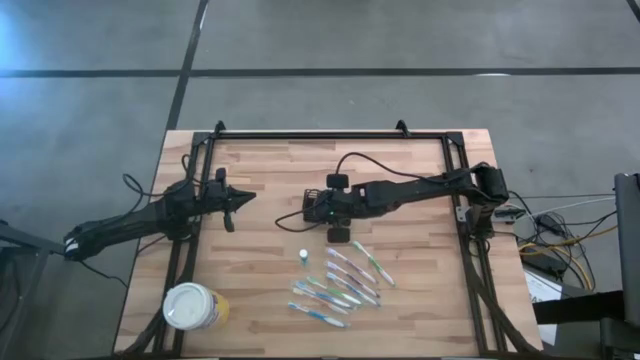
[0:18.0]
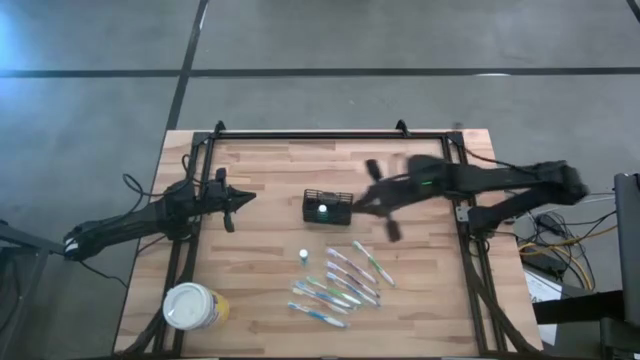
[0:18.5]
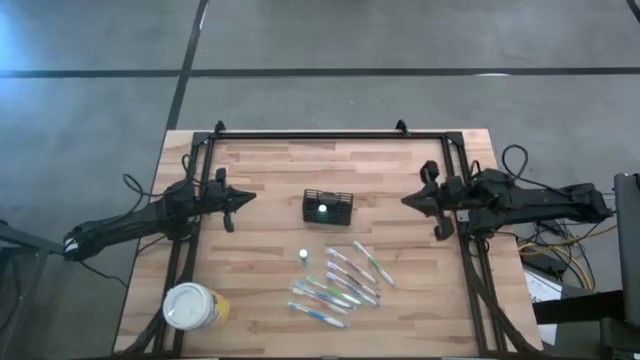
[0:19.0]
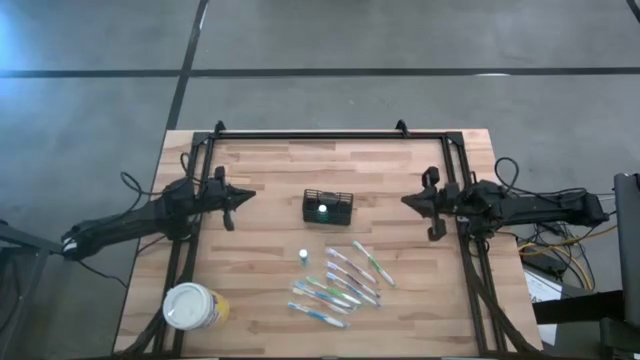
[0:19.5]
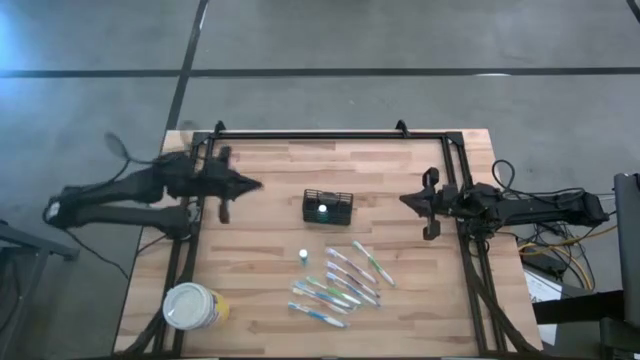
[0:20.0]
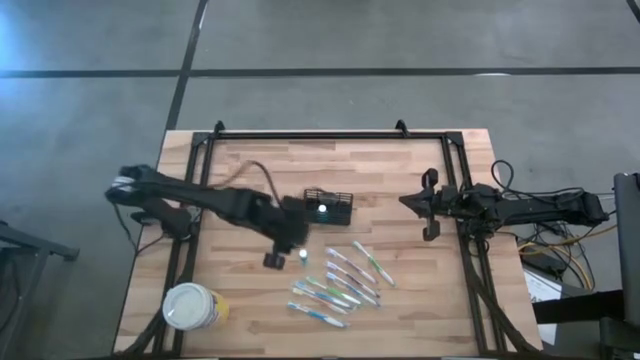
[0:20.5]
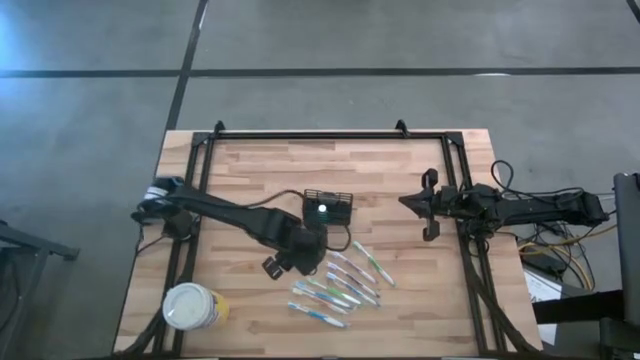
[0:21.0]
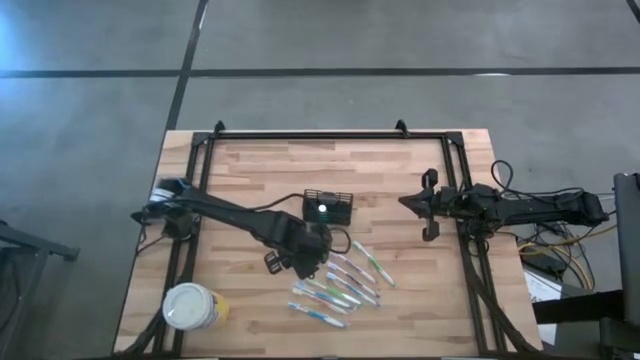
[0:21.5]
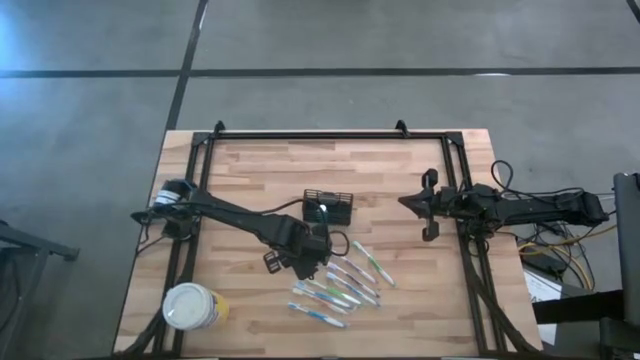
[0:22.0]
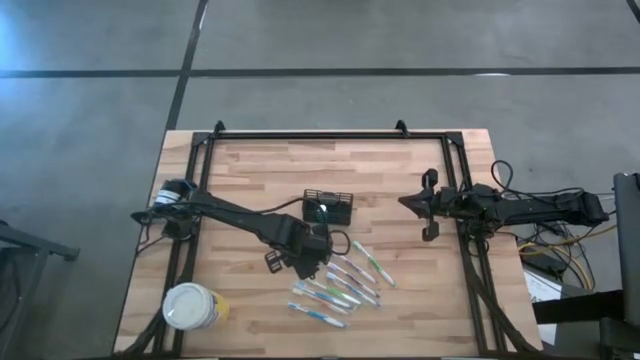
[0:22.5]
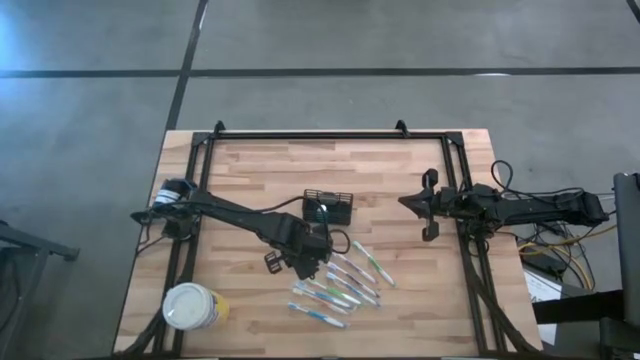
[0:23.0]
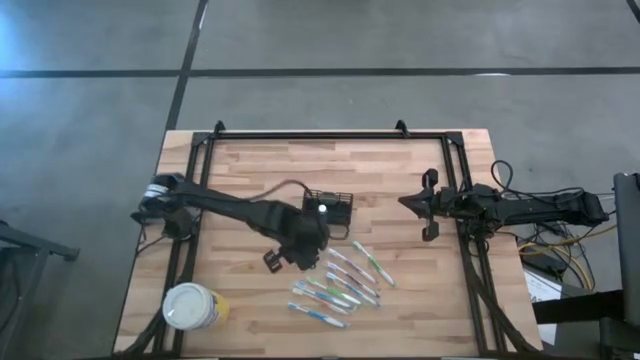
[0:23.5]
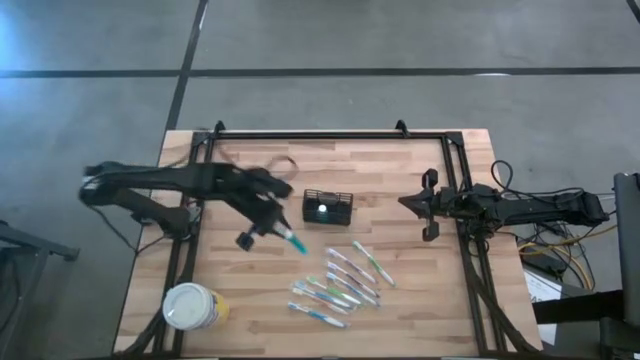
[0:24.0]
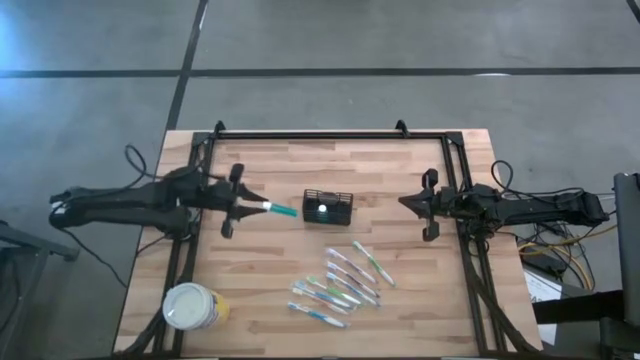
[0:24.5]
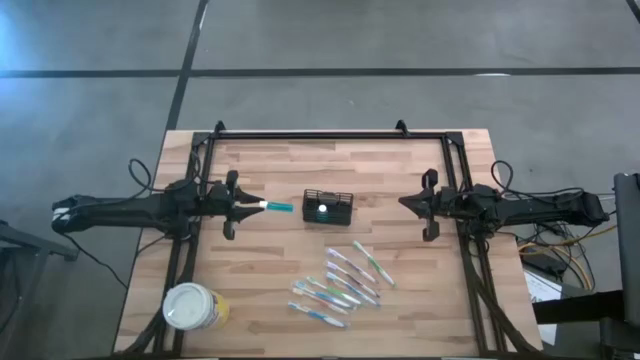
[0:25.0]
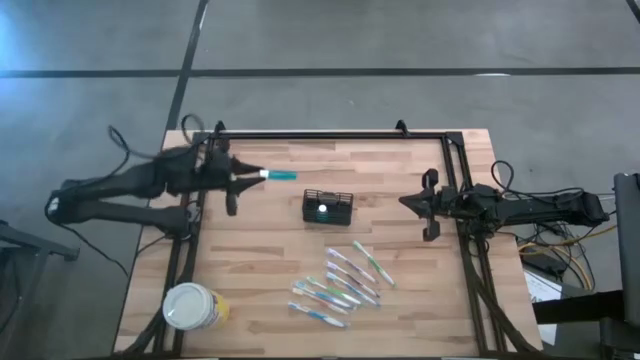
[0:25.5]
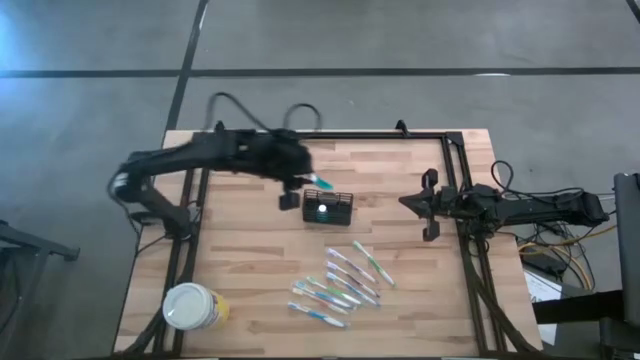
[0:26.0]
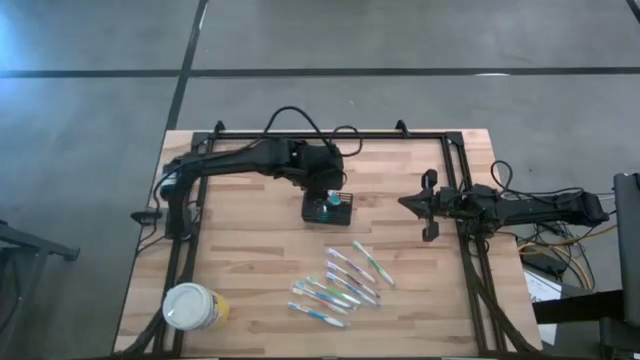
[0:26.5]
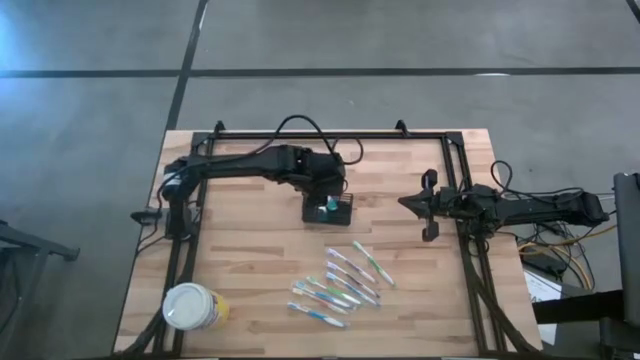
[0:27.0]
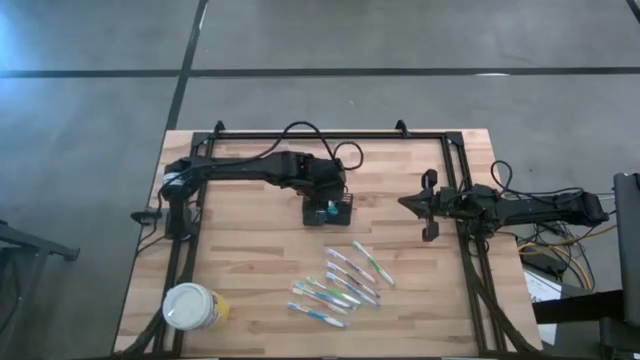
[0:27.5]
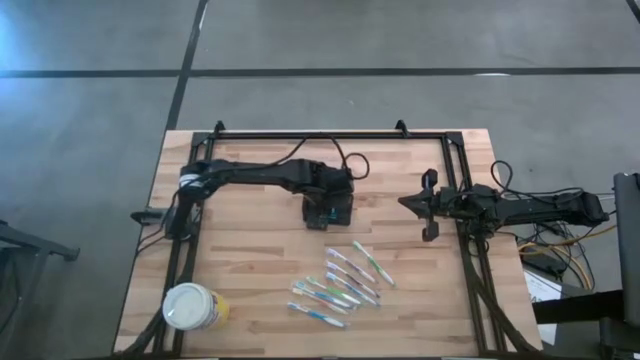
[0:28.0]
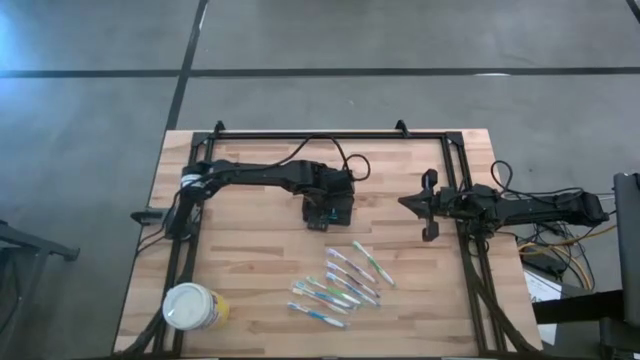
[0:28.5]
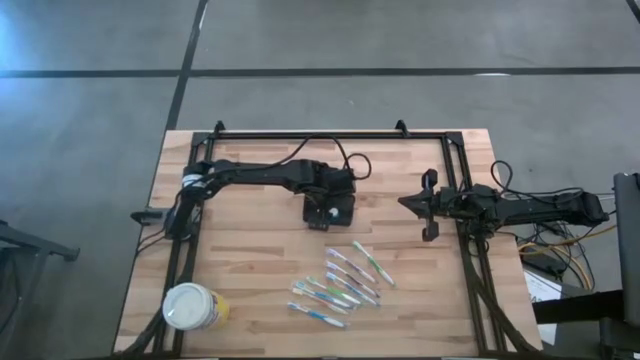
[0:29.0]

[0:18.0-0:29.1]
Task: Pick & Place toothbrushing station
Put the blue mouthwash bottle into the black organizer

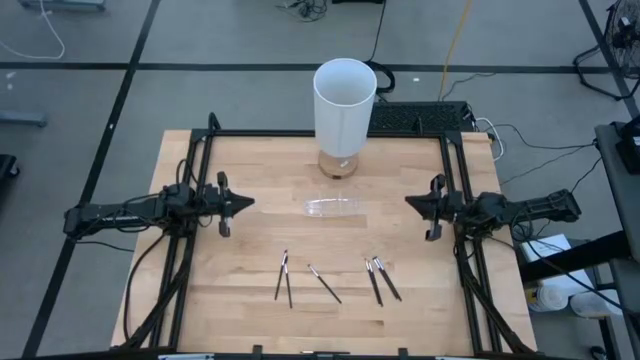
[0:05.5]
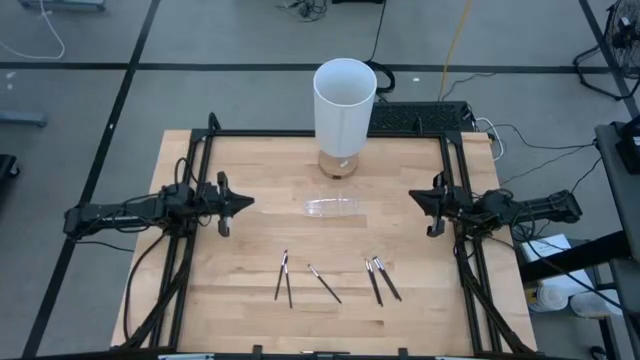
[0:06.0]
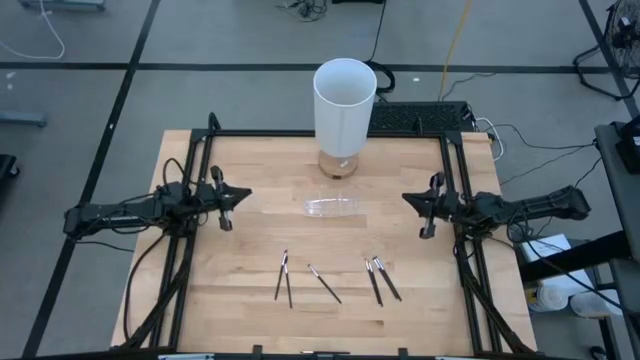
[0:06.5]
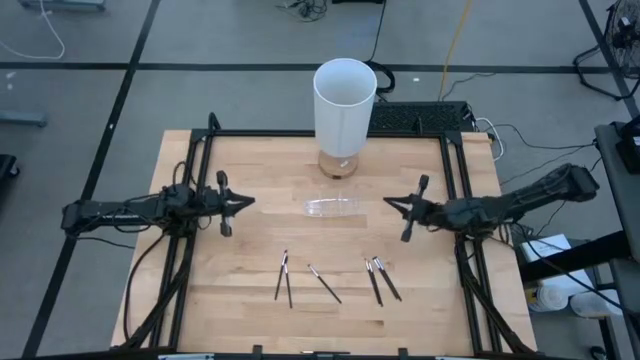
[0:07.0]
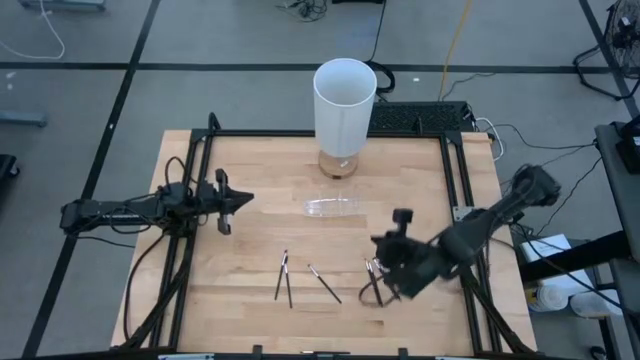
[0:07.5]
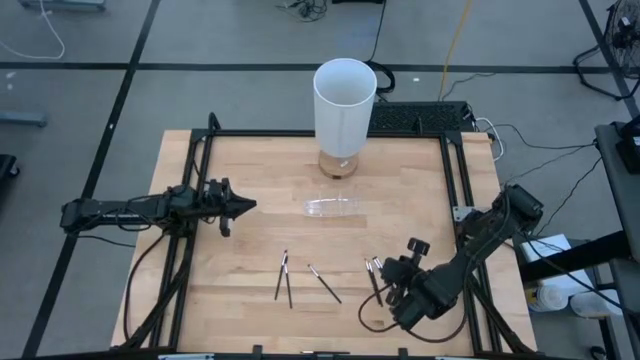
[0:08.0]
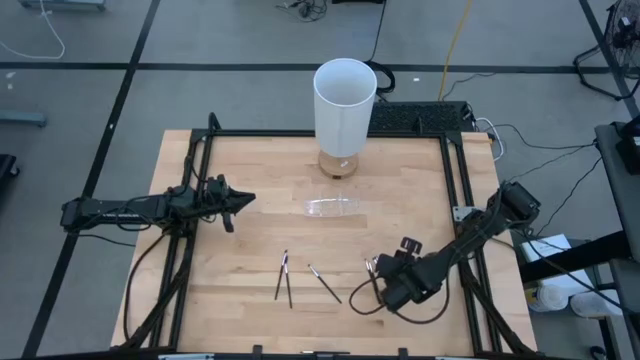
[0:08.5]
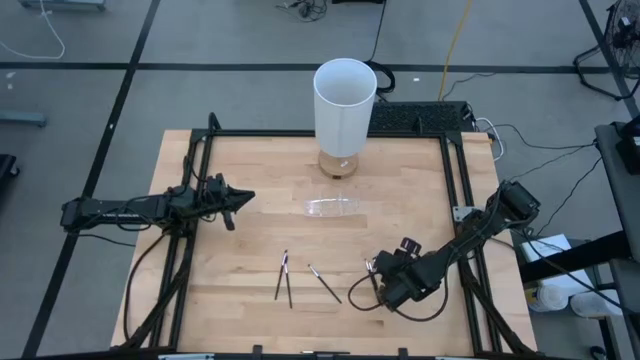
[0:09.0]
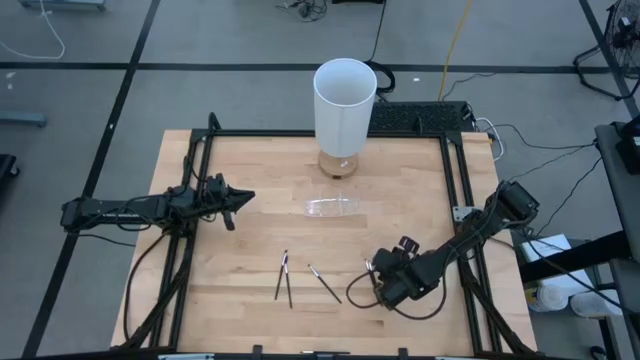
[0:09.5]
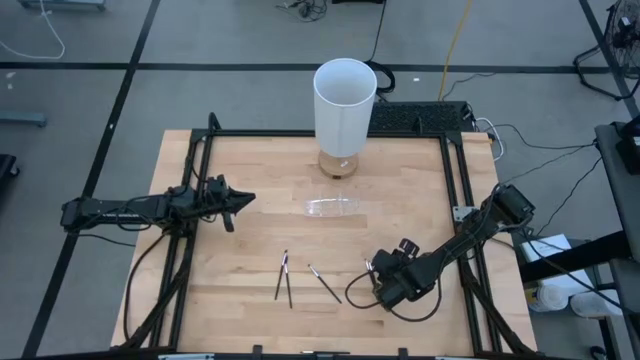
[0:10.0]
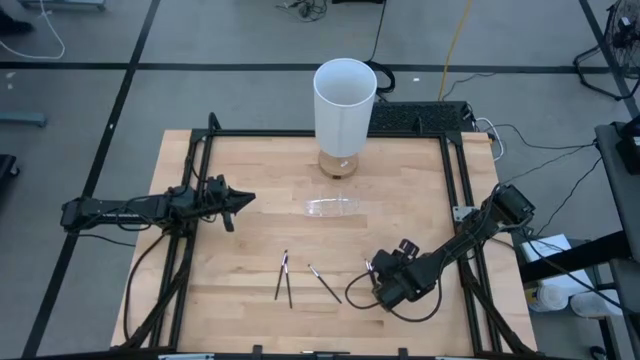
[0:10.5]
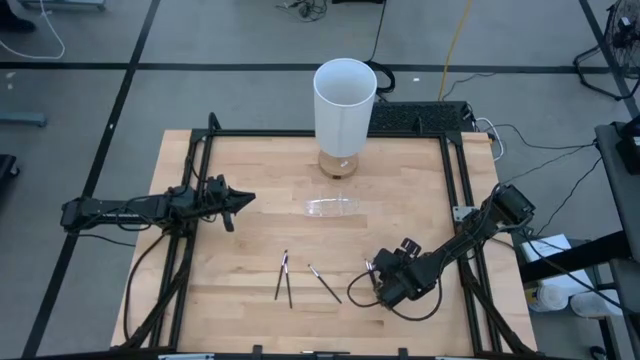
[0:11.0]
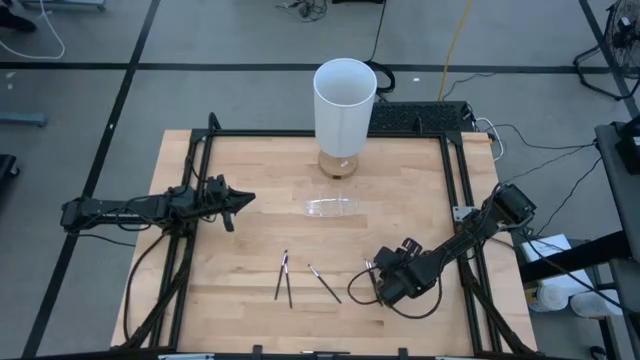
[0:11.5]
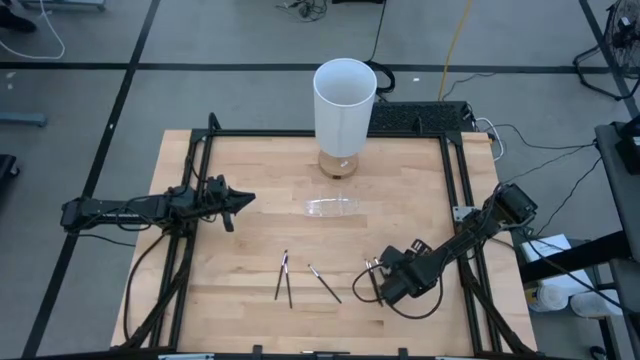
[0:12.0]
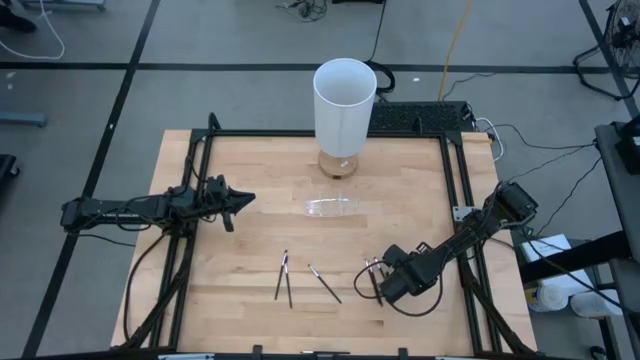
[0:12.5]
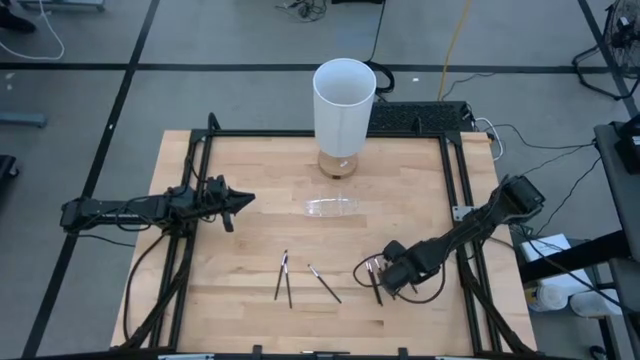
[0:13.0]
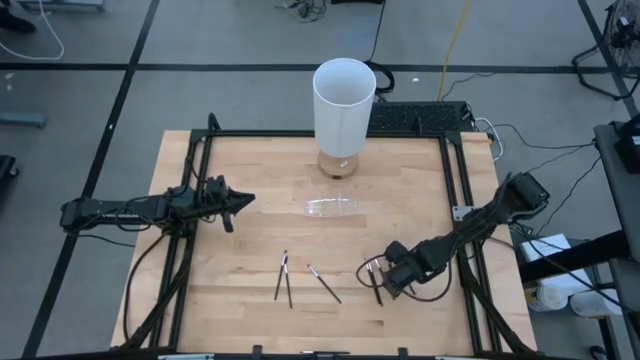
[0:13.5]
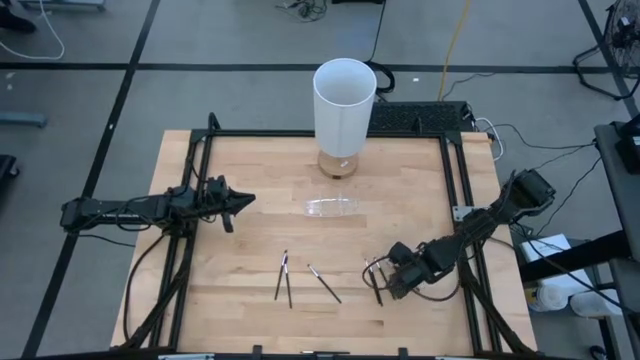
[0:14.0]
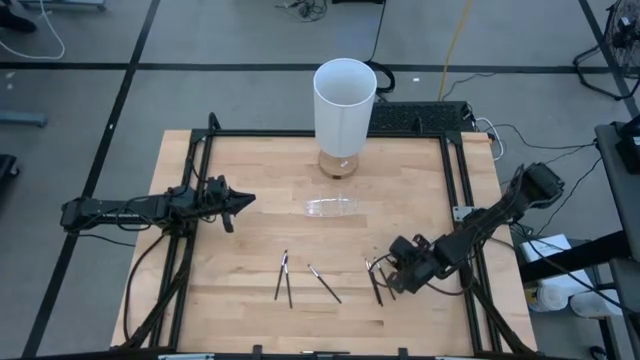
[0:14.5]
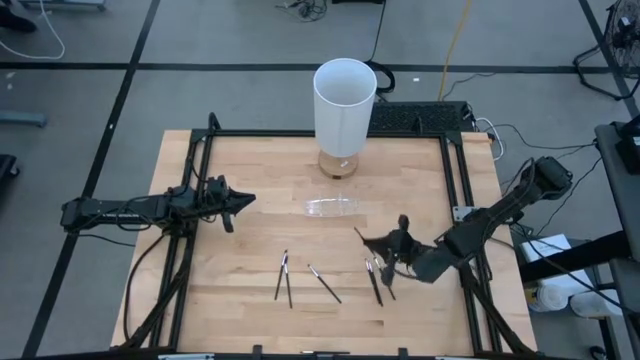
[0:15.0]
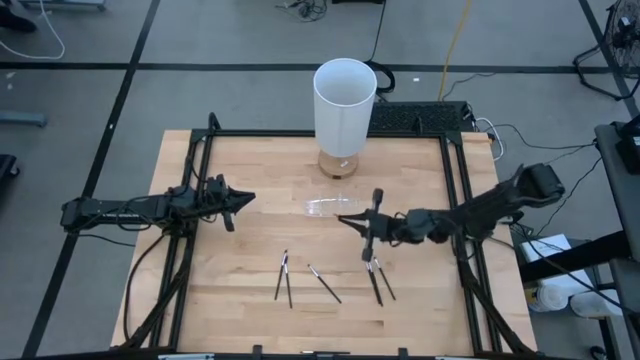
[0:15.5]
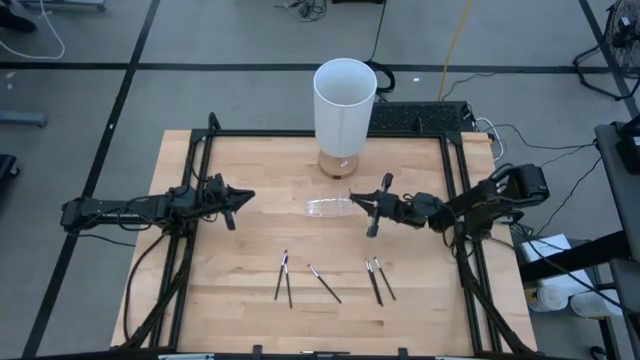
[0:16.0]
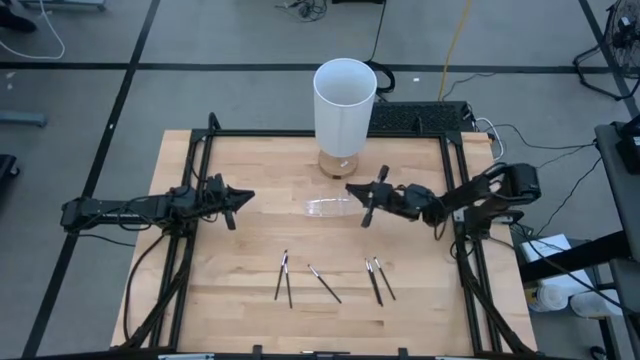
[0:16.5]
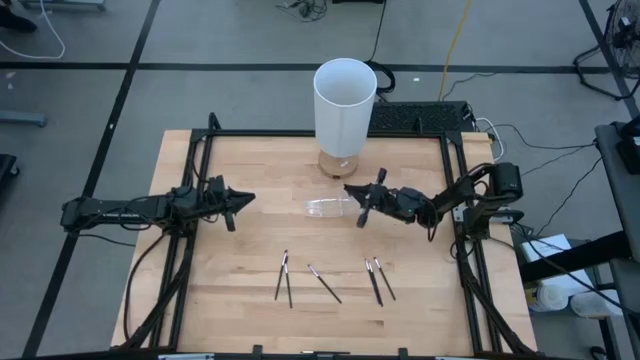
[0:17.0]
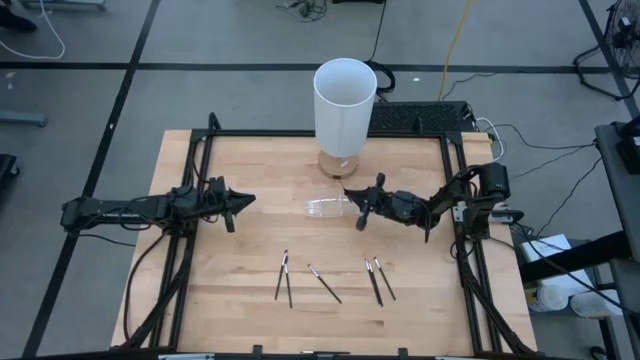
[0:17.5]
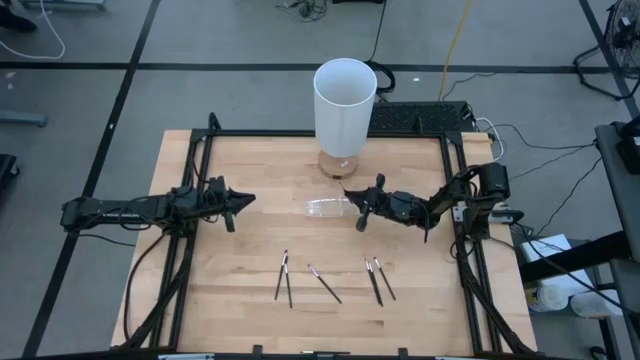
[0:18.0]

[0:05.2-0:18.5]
Task: Put items in baskets/containers
Put the eyeshadow brush into the the transparent organizer
